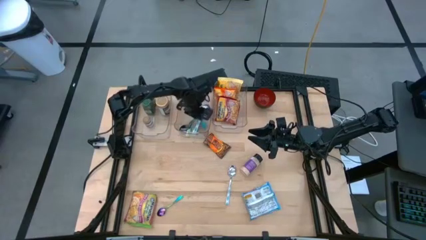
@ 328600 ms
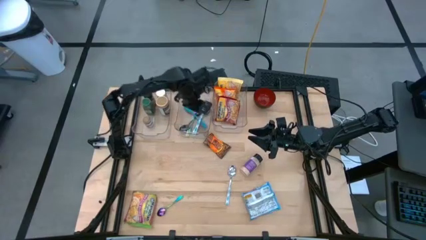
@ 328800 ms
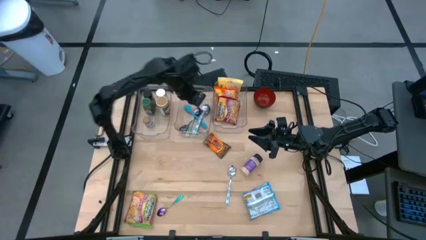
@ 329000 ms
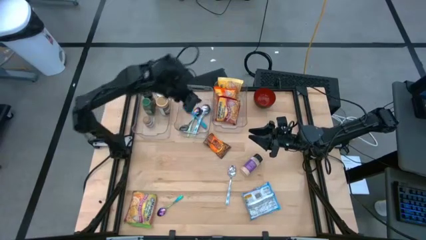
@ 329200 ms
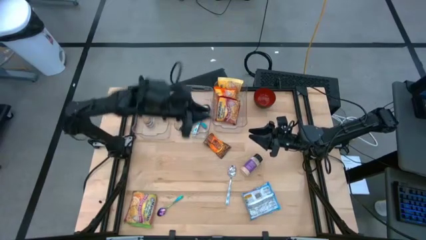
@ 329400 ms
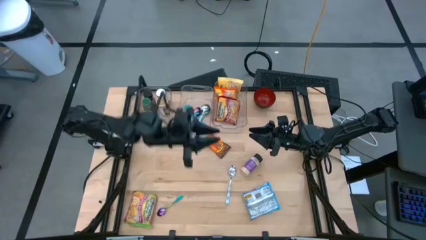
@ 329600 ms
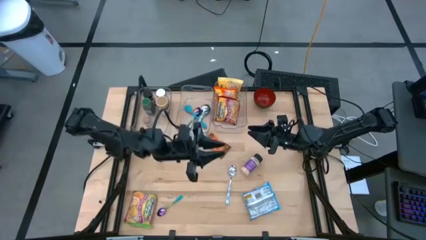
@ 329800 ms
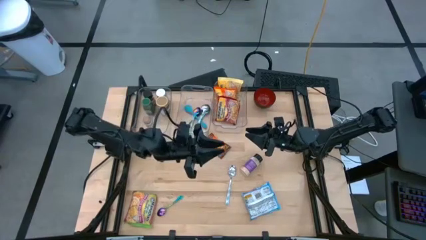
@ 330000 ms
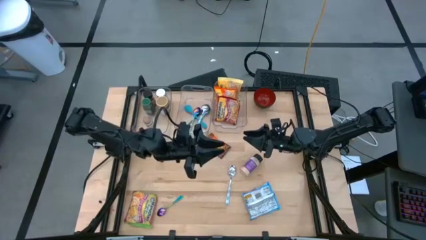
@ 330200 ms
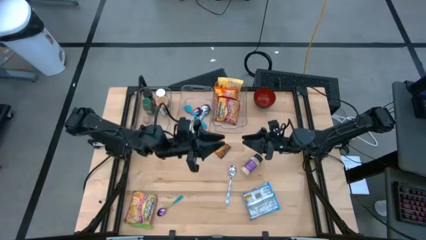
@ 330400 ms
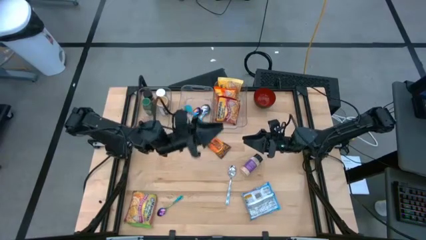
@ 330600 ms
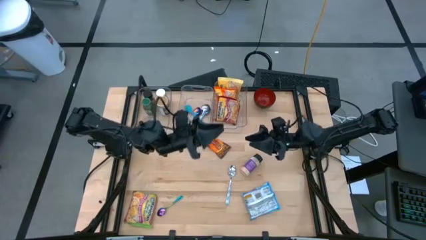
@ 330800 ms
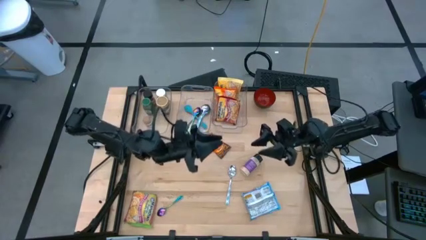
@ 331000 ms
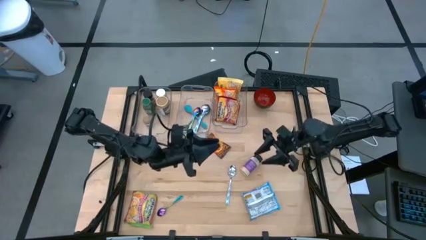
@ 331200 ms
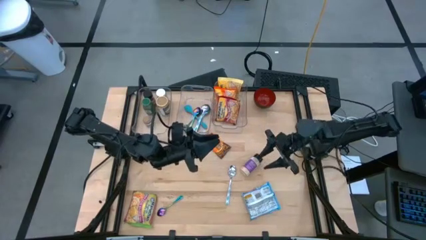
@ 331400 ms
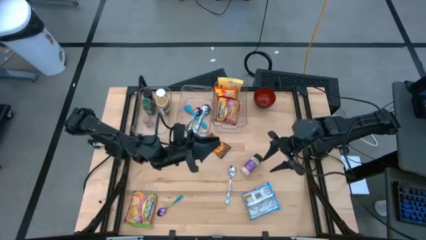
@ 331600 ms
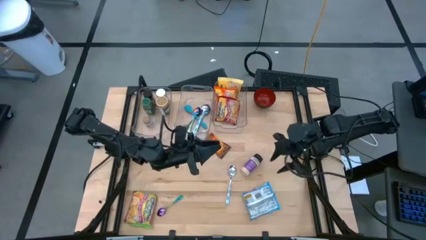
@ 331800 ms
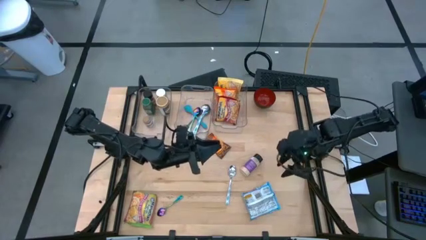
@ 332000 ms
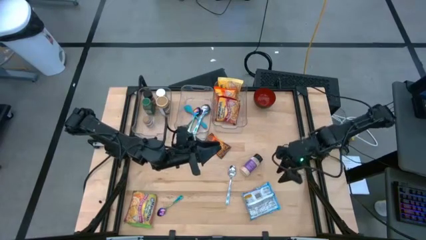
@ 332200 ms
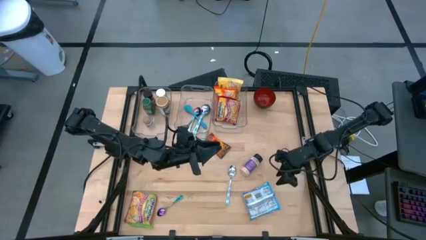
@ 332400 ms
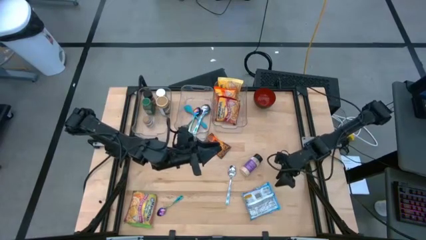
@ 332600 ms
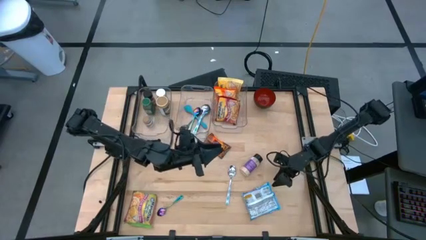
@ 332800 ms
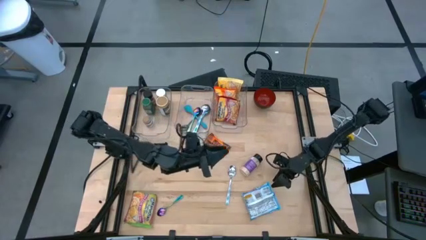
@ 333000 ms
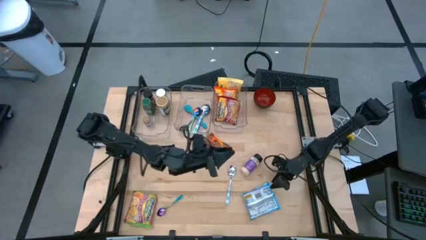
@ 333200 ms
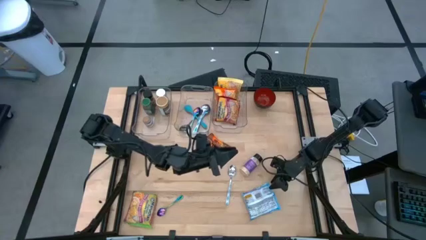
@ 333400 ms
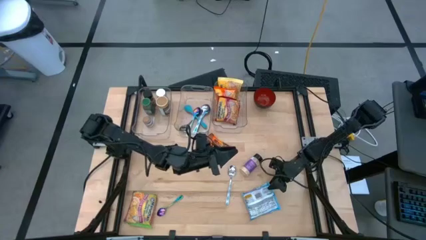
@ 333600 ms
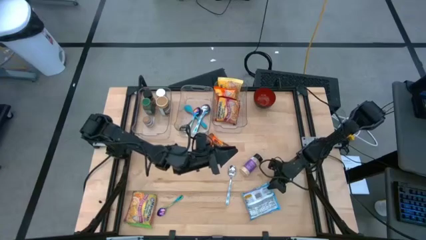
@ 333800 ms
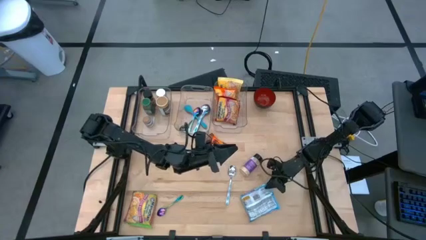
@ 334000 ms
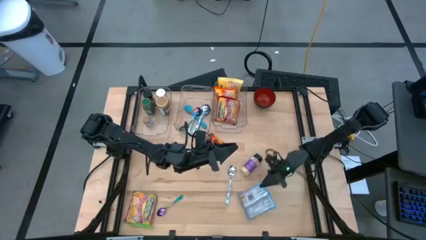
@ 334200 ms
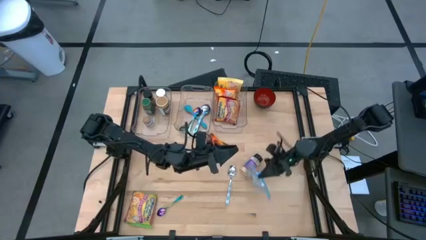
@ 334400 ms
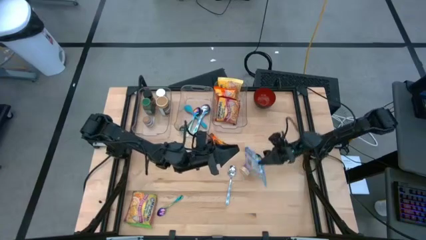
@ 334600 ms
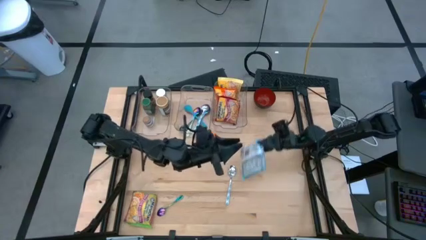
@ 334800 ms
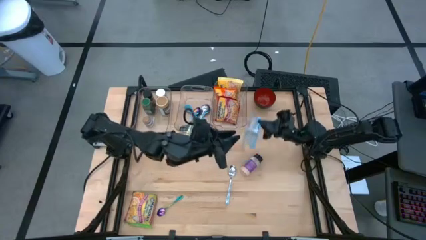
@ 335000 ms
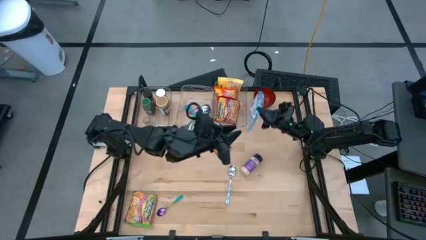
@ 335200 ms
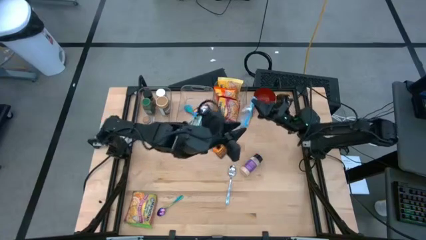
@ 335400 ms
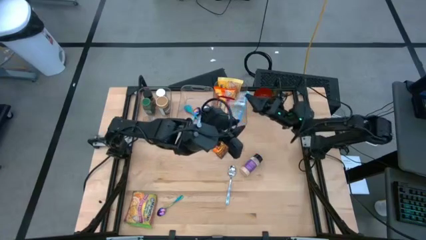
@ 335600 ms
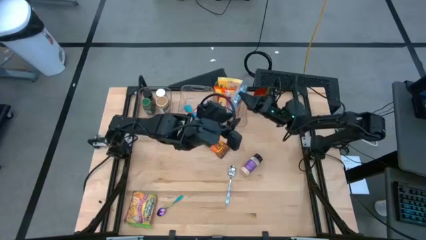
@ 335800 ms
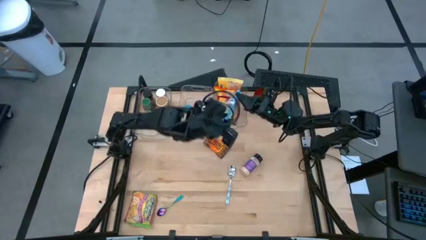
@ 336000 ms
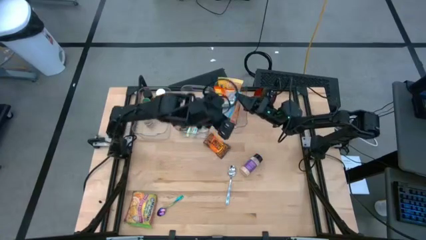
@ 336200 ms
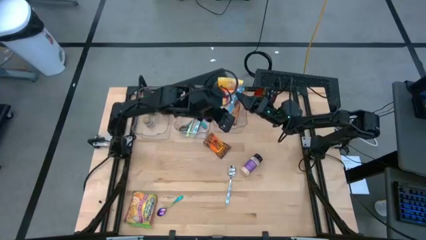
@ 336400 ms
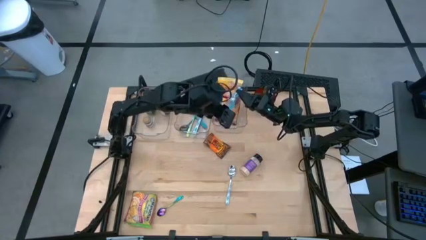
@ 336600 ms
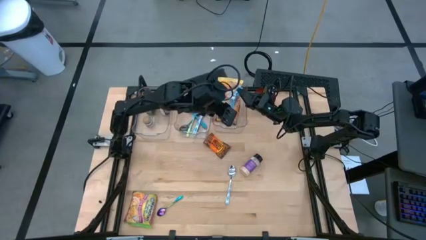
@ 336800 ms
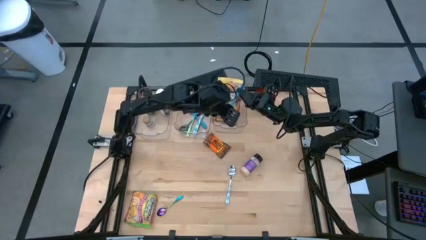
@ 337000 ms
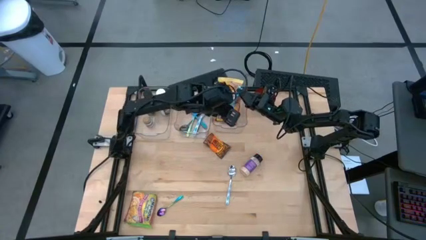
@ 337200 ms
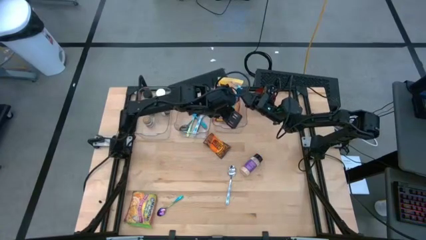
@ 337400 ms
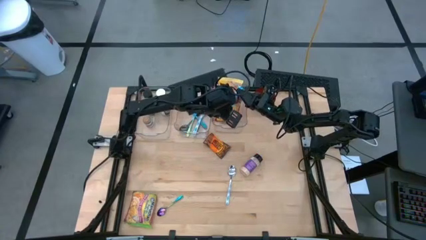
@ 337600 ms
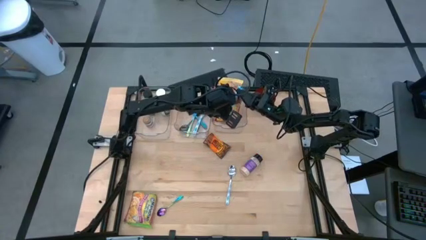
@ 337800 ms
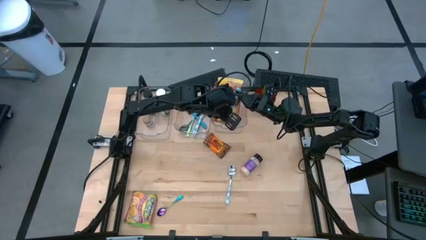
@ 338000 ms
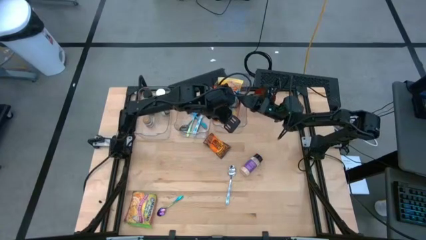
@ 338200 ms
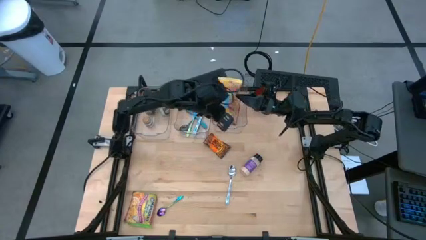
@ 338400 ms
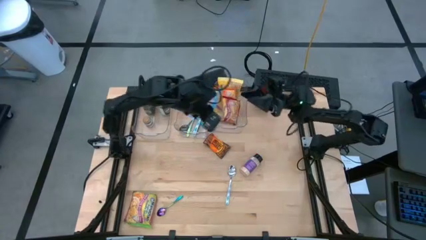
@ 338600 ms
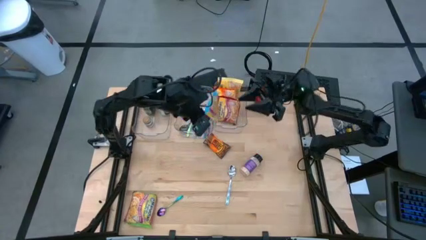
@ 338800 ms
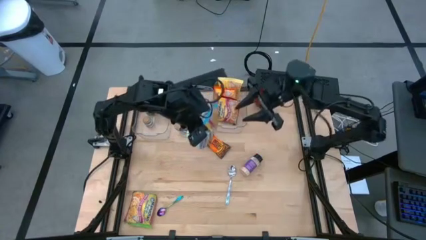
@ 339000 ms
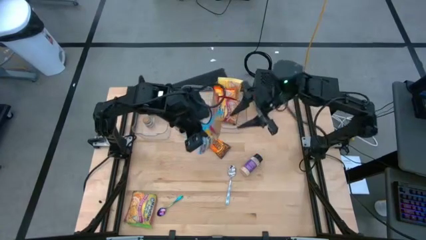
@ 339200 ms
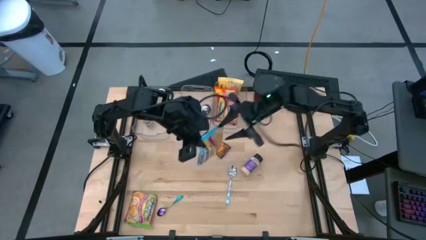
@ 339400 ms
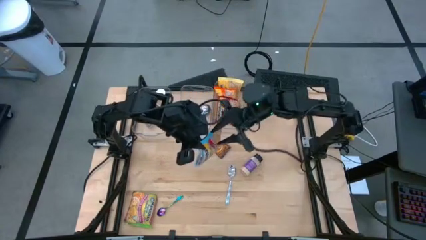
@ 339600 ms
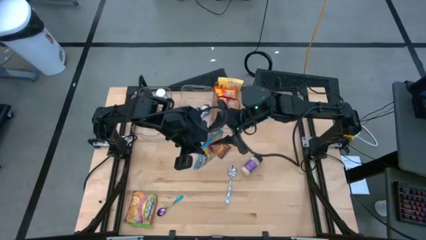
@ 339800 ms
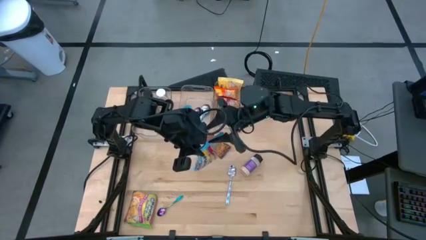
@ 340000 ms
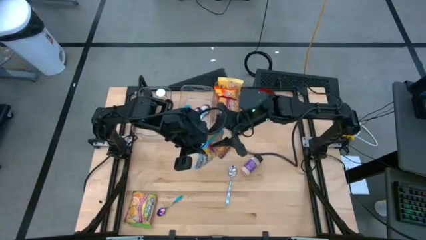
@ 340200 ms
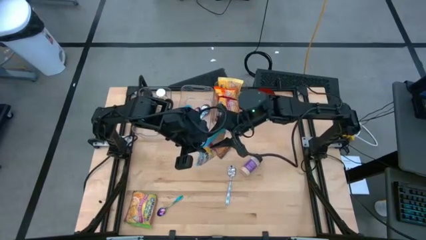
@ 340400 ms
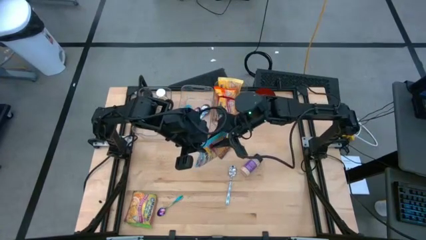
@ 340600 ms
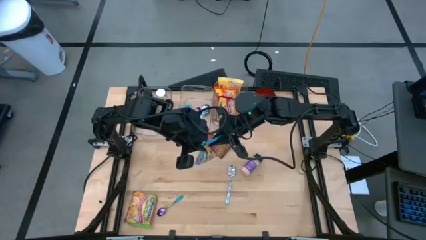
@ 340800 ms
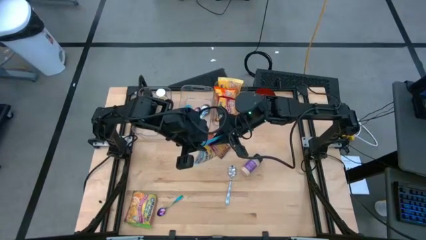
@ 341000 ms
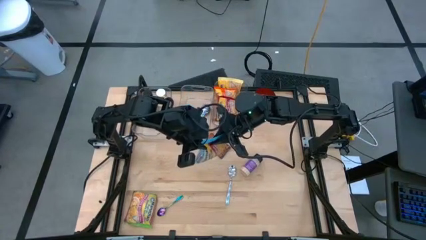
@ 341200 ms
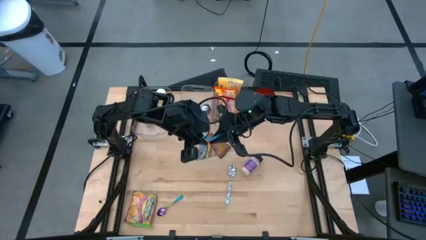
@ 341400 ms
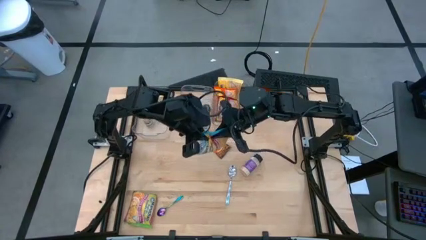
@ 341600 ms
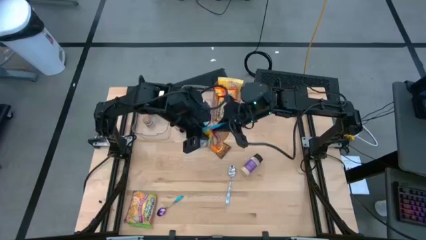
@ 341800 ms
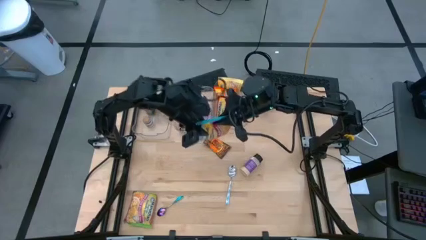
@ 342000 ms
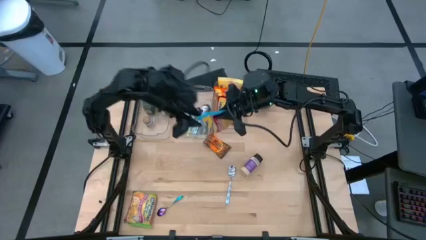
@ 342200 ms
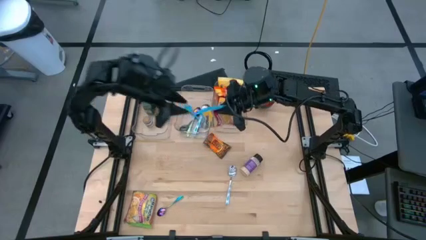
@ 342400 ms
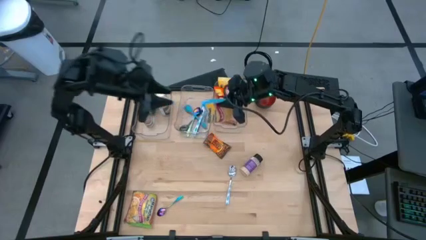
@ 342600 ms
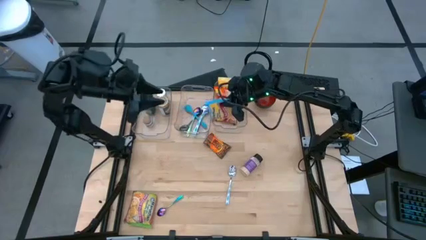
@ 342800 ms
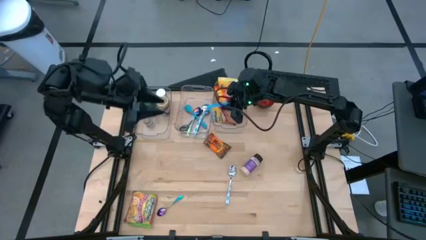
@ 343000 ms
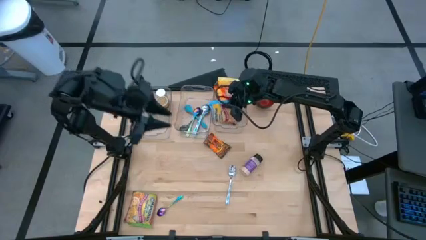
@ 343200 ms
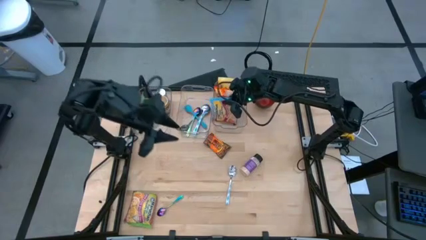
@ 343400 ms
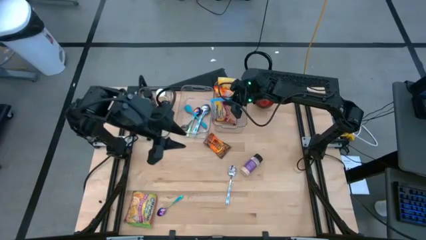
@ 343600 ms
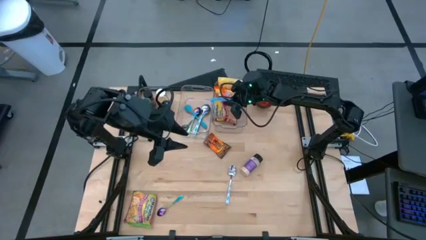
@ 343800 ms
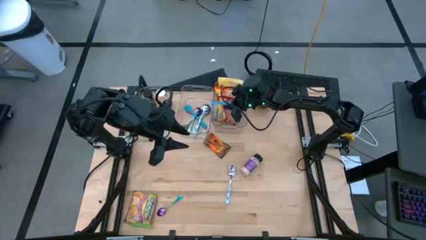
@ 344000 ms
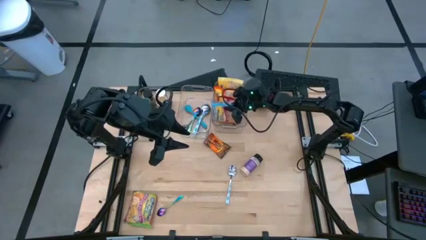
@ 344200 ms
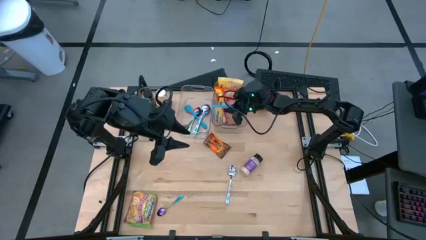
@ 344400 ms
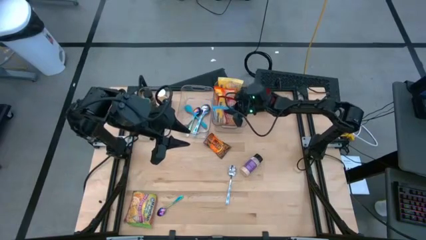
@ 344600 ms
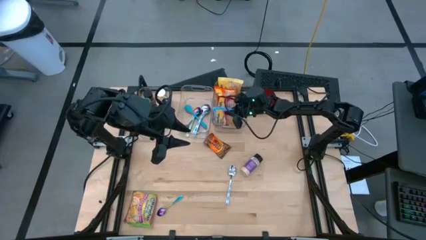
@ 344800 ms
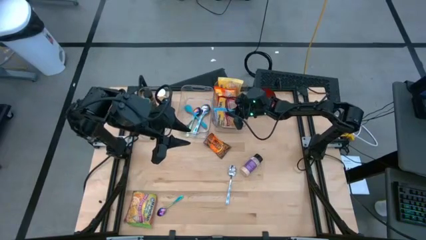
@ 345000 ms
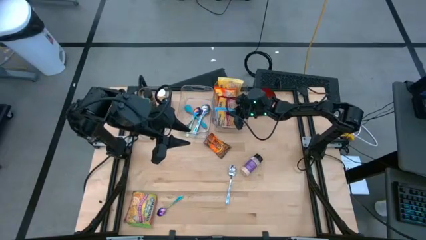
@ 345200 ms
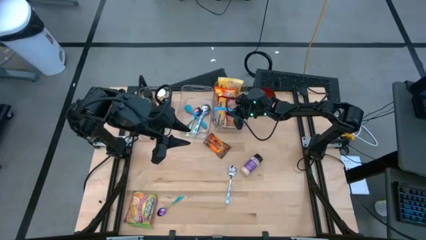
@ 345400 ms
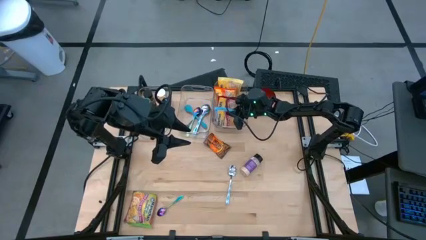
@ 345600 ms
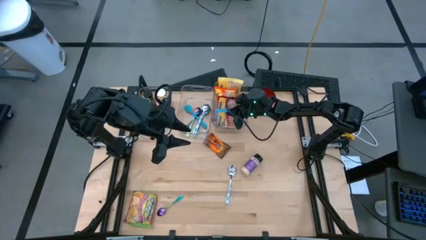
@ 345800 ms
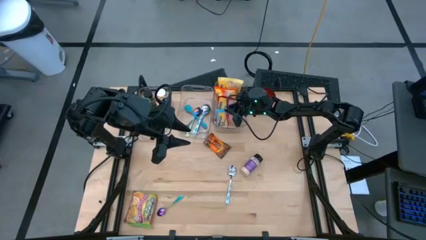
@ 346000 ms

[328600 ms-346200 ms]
Task: Pick & Place Food Item
Put the blue noodle pack into the right transparent bin
